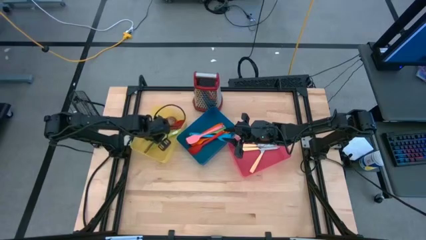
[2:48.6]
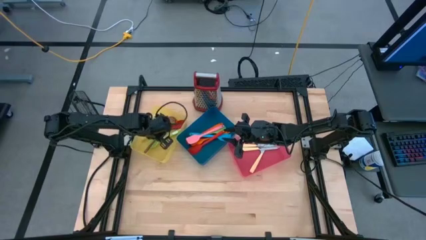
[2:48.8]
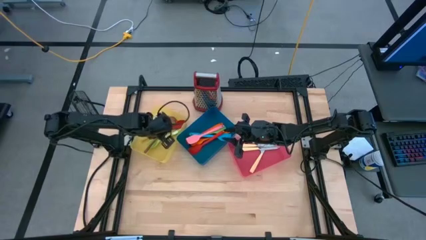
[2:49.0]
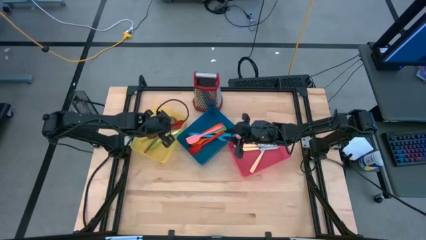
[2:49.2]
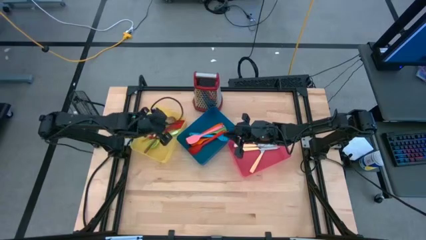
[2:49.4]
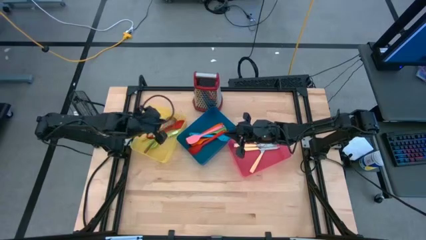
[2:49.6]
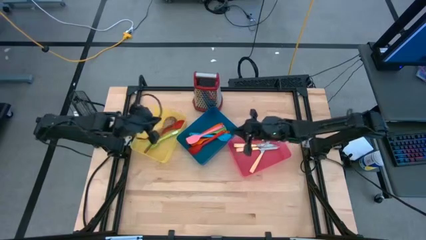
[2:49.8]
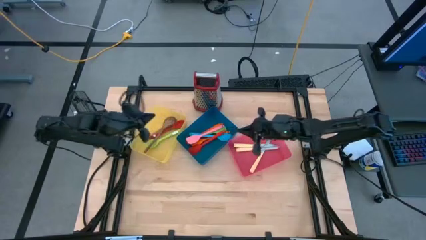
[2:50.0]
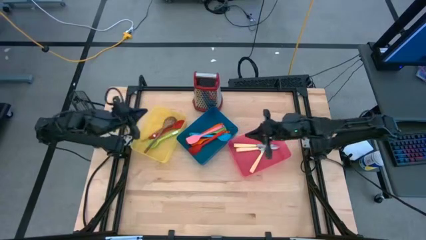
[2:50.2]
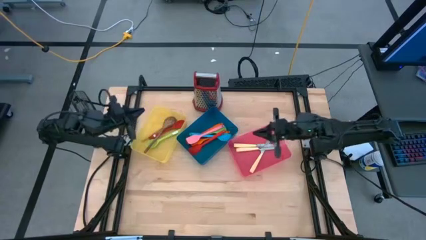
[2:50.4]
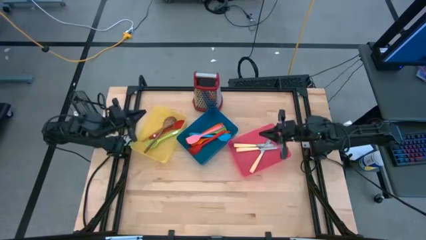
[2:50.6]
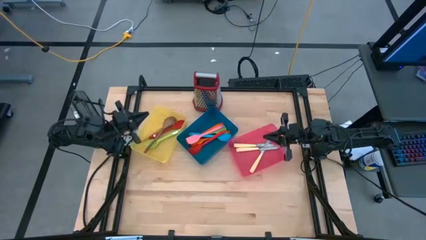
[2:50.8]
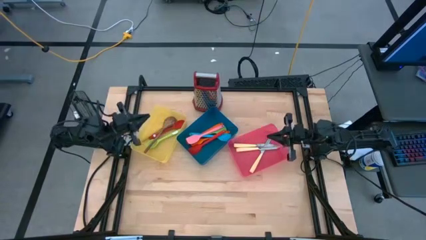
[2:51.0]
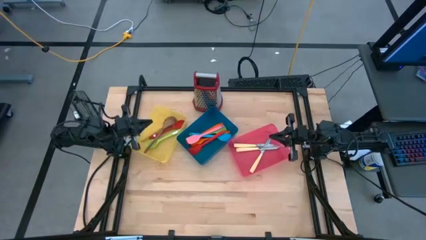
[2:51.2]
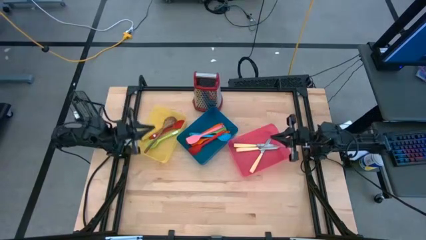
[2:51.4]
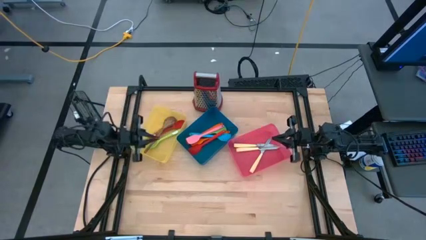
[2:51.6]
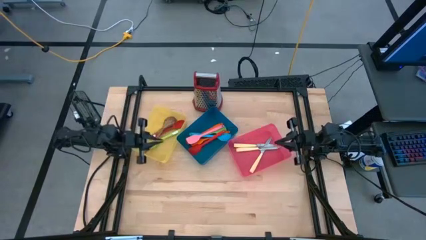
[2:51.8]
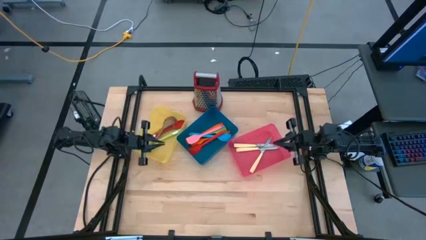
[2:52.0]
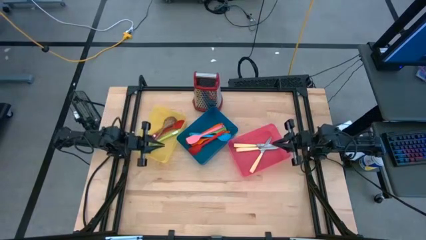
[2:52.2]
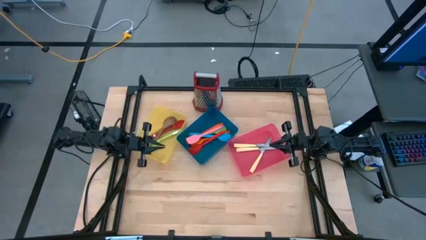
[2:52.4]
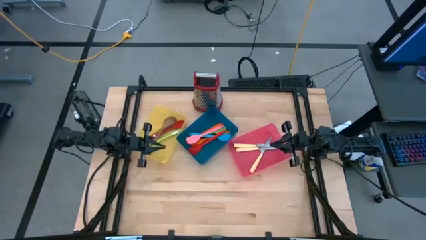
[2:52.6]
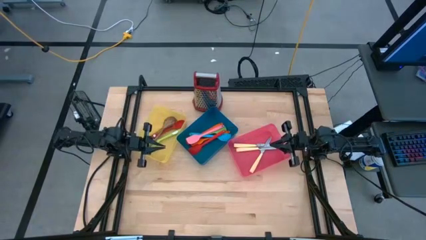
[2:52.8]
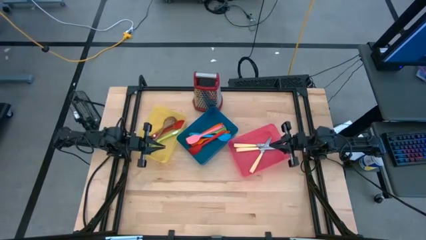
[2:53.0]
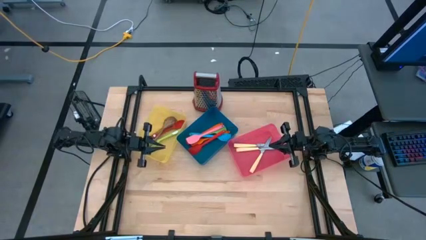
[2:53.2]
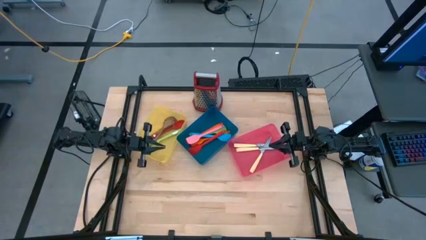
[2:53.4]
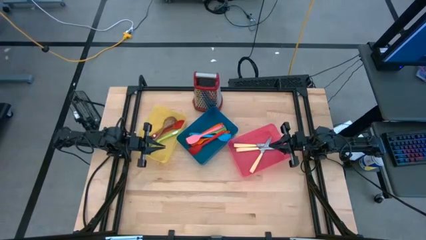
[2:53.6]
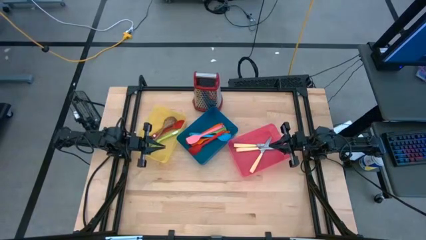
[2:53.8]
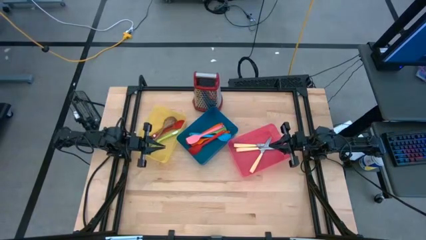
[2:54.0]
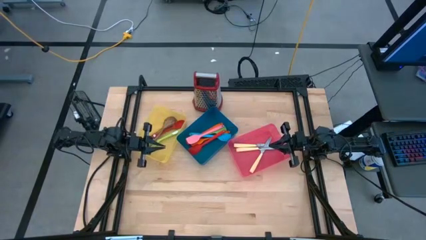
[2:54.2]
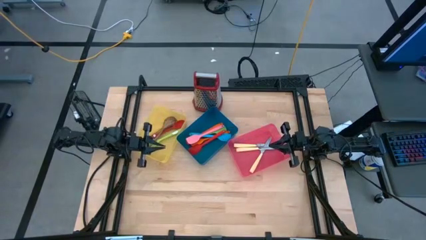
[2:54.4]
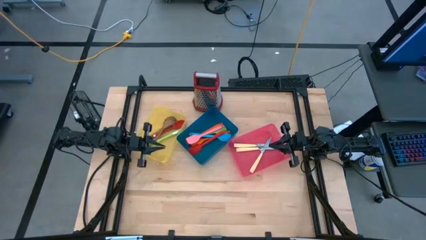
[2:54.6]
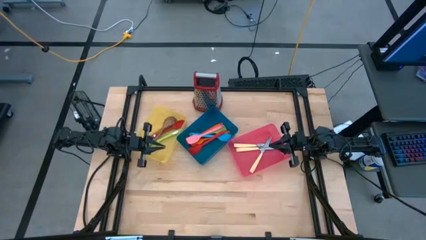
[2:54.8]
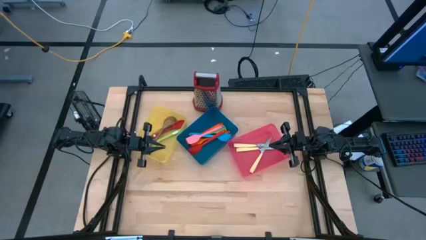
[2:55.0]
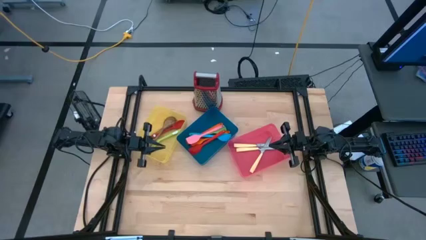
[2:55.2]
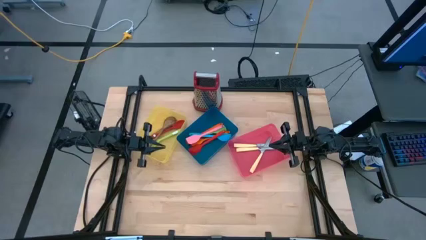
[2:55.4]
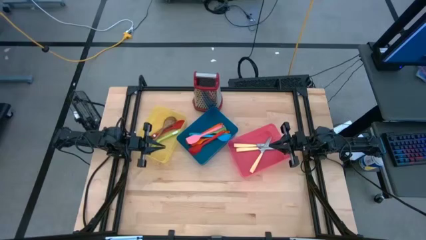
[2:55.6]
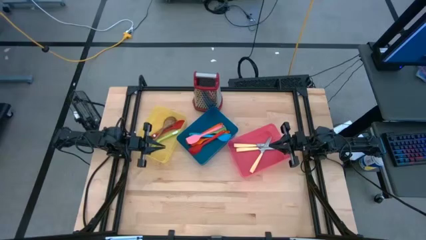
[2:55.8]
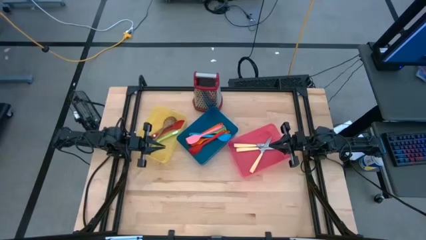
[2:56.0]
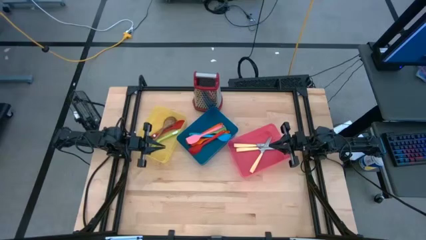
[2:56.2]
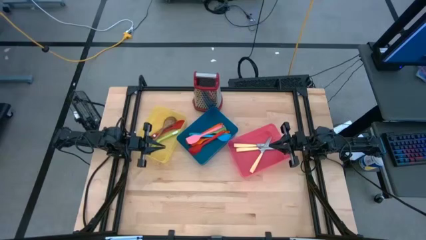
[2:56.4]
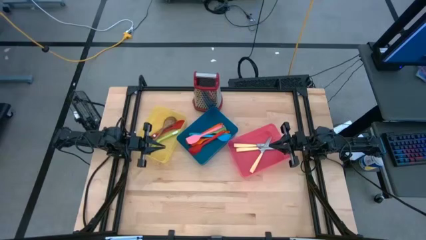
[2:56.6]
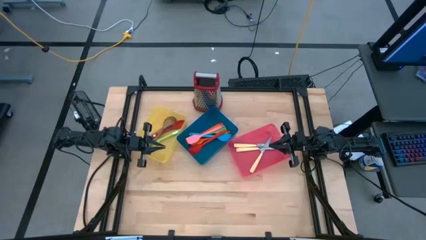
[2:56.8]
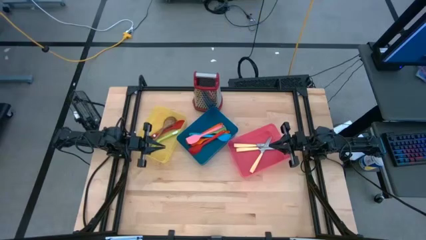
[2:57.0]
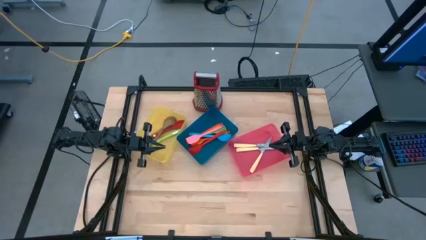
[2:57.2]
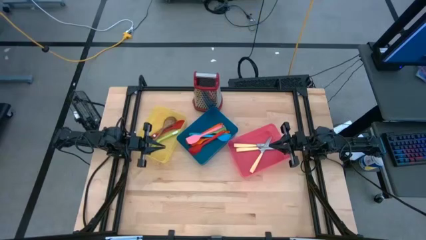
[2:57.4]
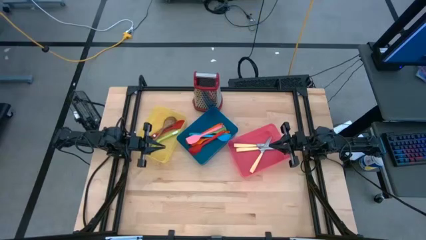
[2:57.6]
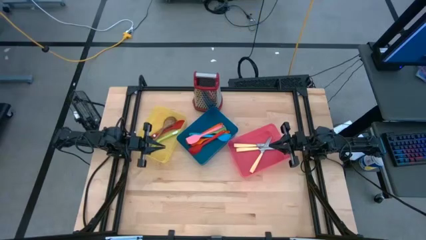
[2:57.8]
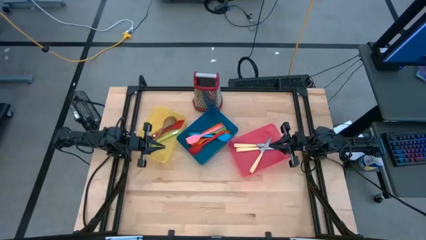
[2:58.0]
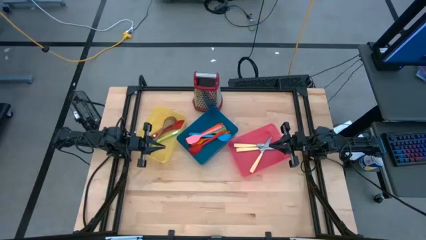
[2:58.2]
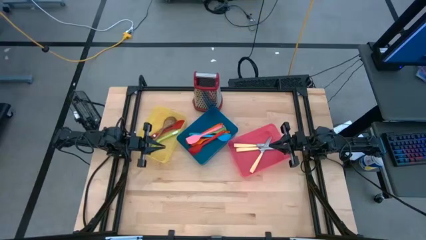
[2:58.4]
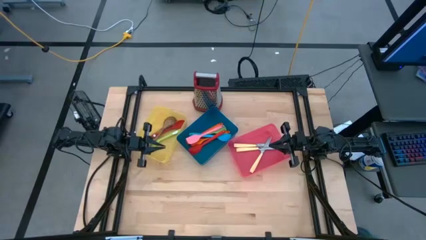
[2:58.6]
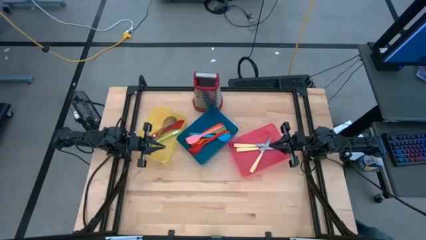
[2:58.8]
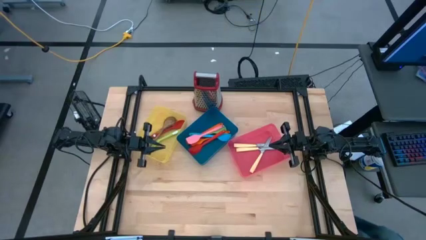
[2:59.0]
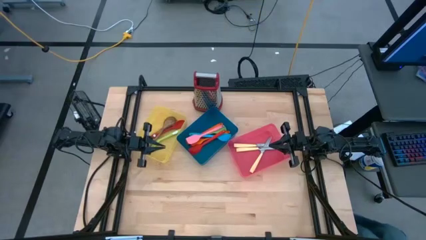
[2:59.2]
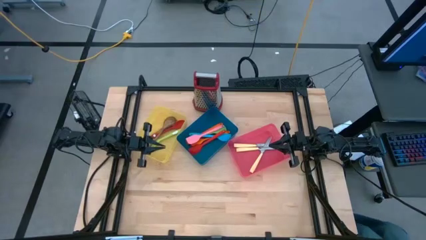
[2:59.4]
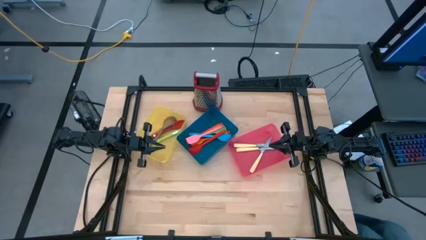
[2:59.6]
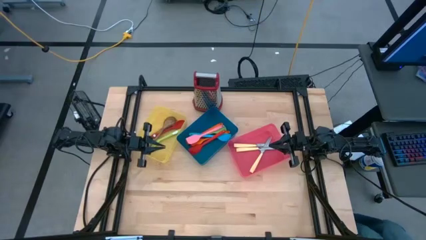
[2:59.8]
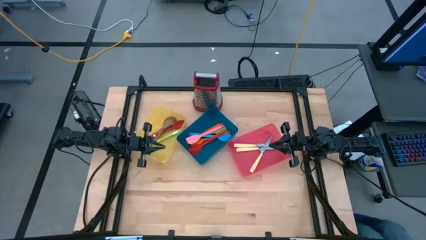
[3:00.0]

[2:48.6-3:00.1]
Task: Pick & Place Kitchen Items
Return to Home Position
